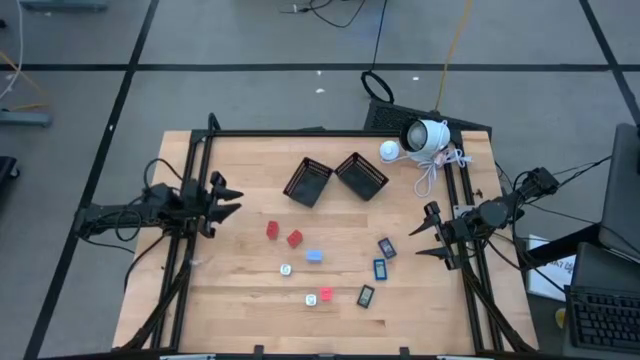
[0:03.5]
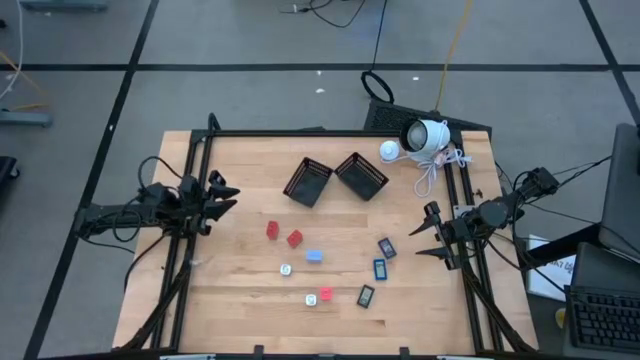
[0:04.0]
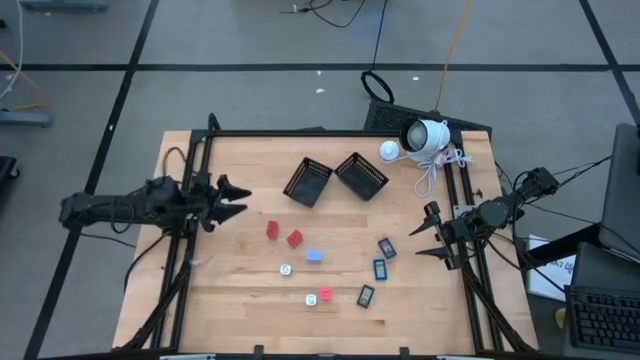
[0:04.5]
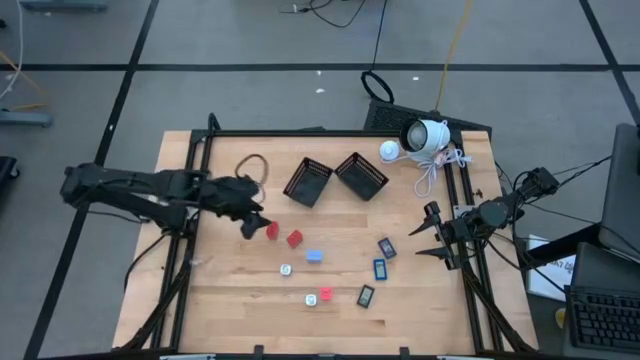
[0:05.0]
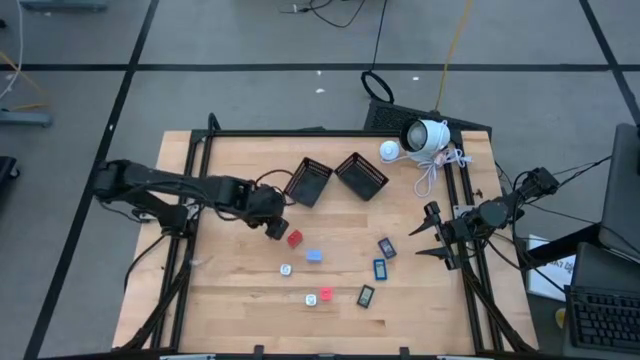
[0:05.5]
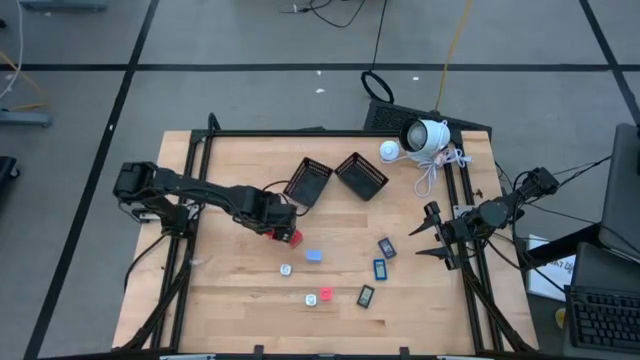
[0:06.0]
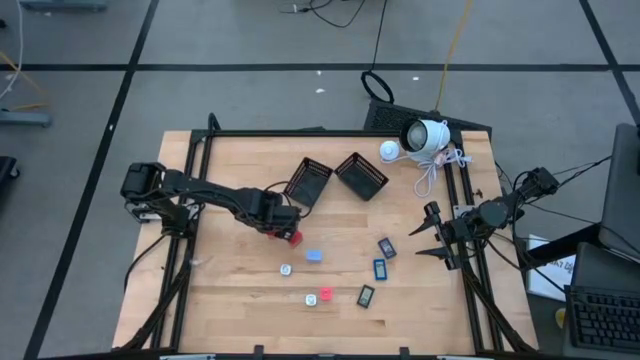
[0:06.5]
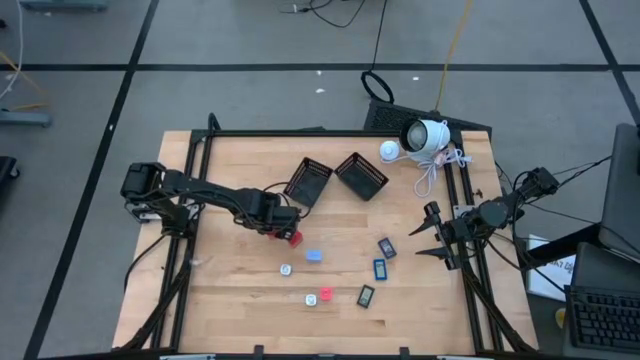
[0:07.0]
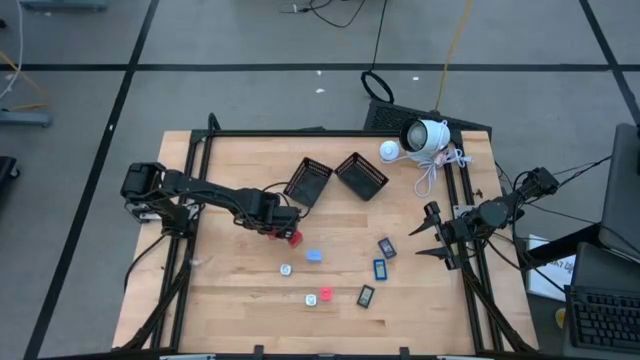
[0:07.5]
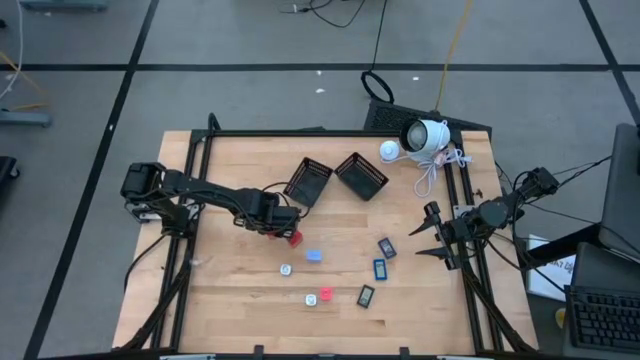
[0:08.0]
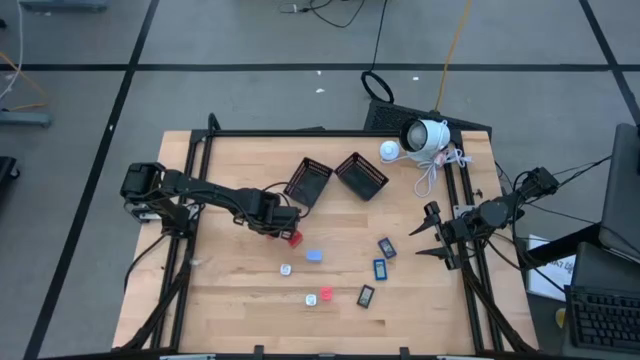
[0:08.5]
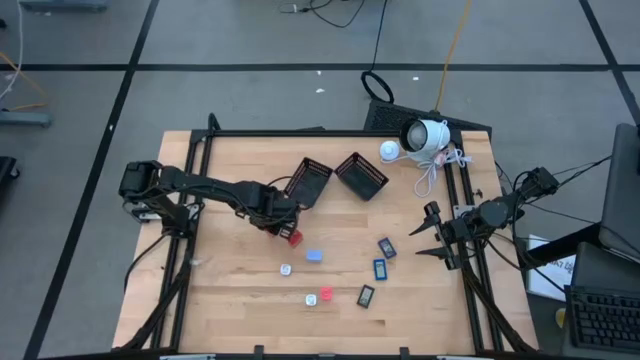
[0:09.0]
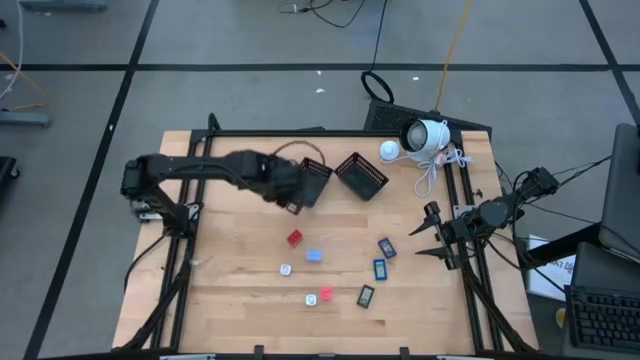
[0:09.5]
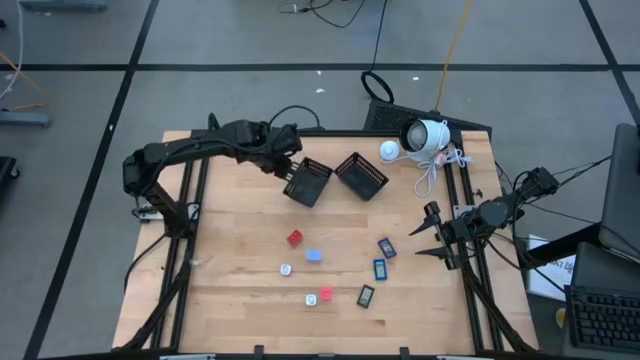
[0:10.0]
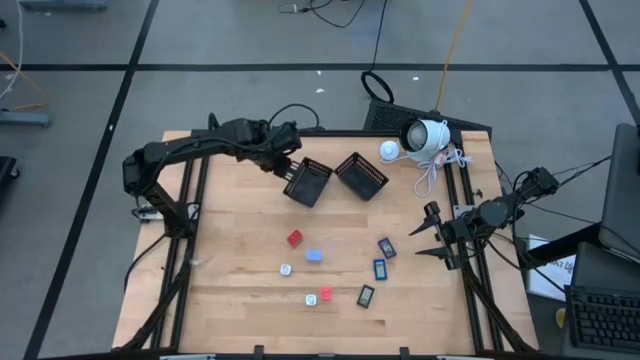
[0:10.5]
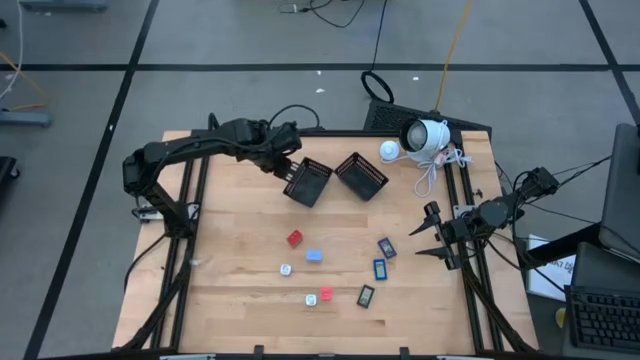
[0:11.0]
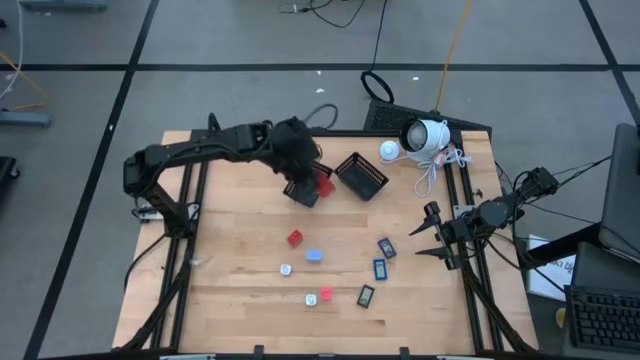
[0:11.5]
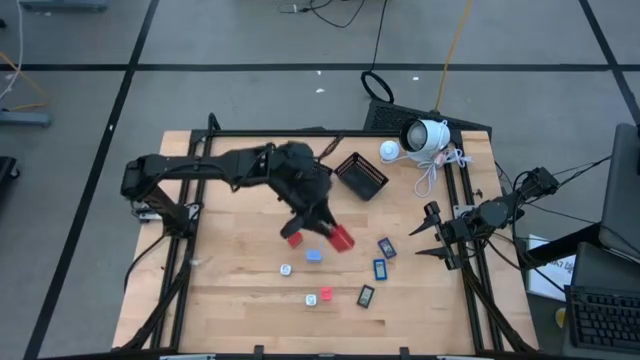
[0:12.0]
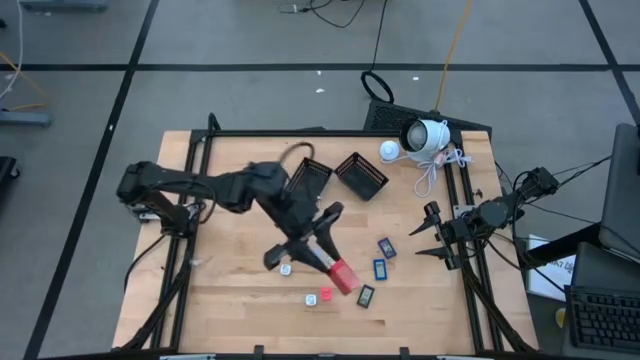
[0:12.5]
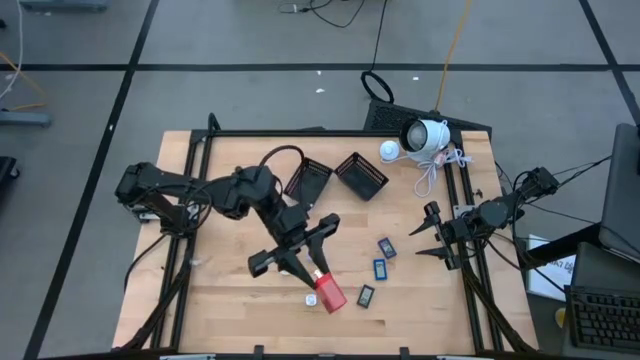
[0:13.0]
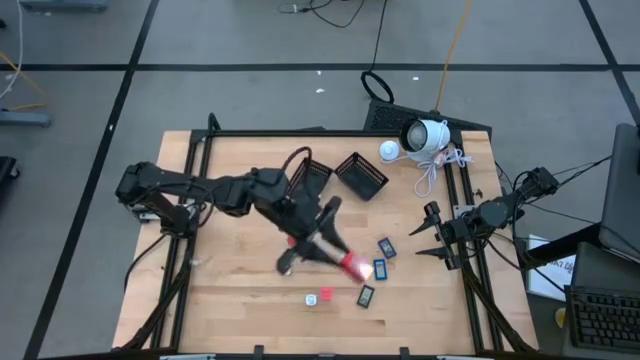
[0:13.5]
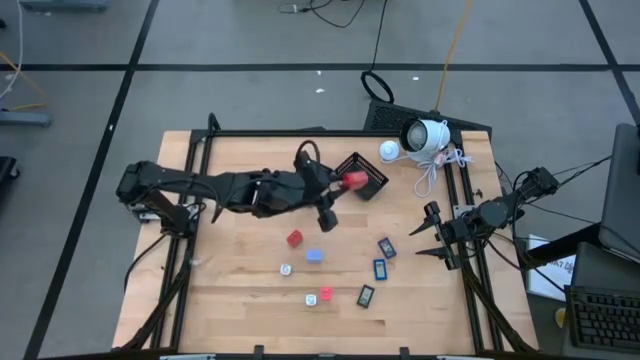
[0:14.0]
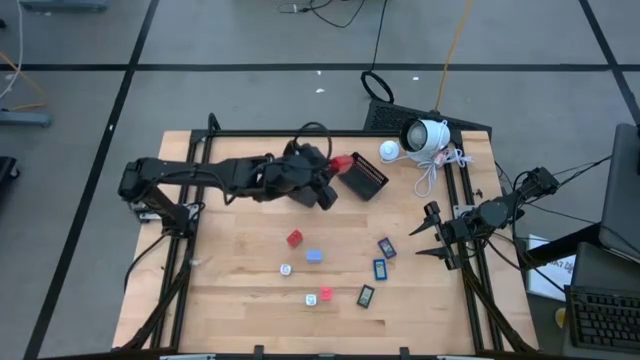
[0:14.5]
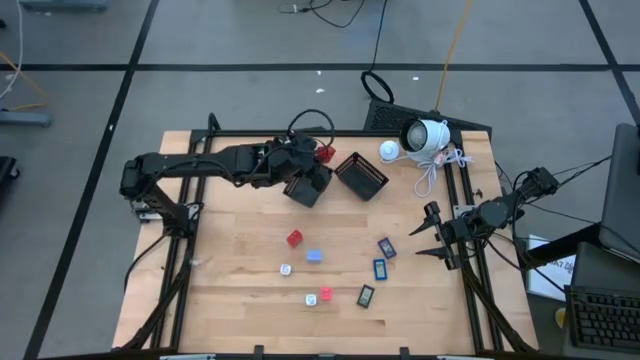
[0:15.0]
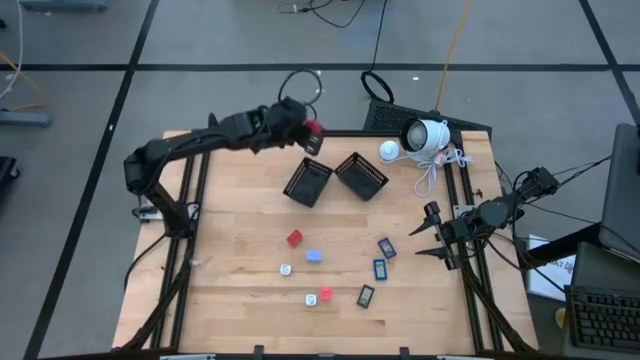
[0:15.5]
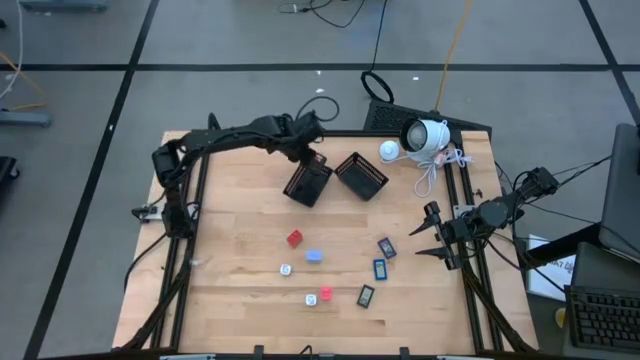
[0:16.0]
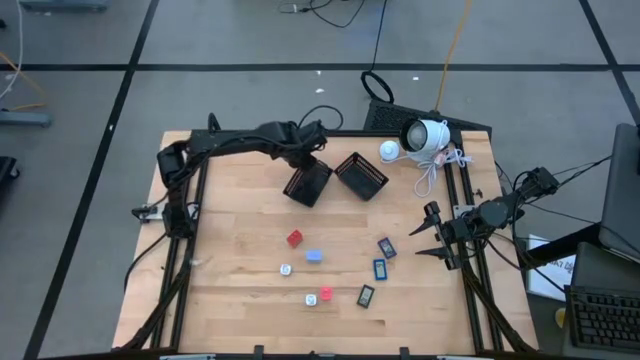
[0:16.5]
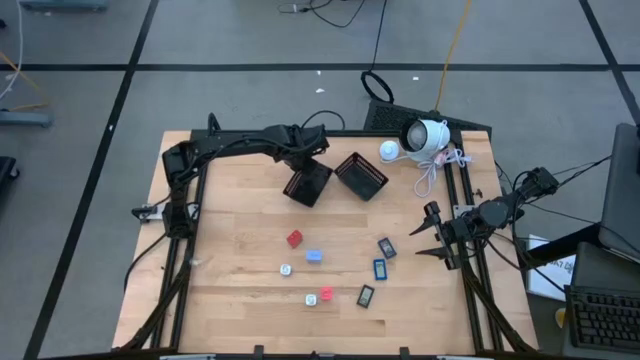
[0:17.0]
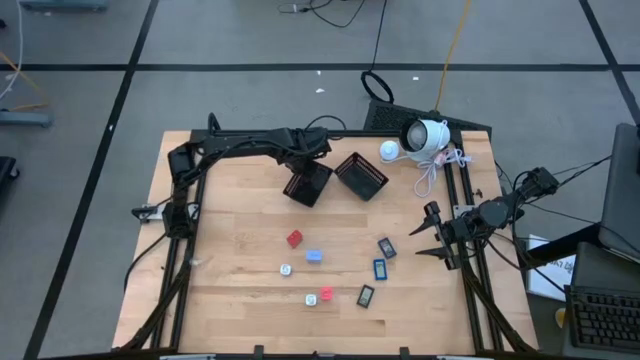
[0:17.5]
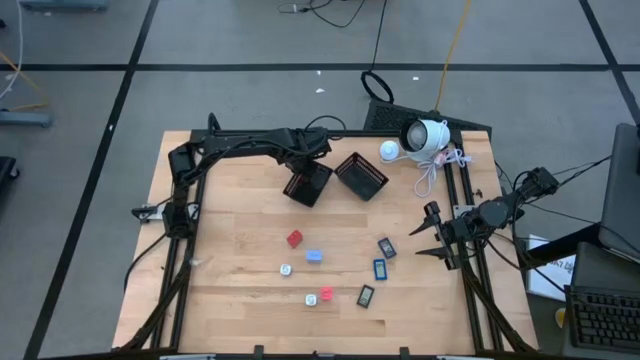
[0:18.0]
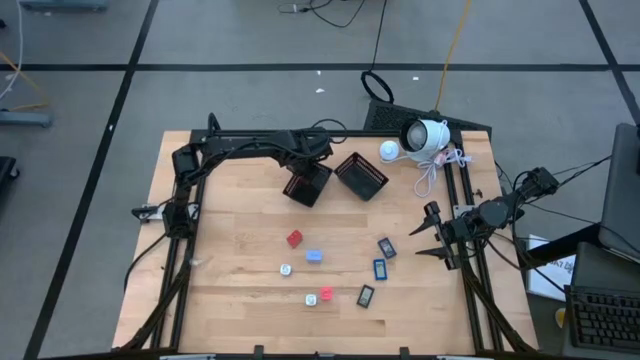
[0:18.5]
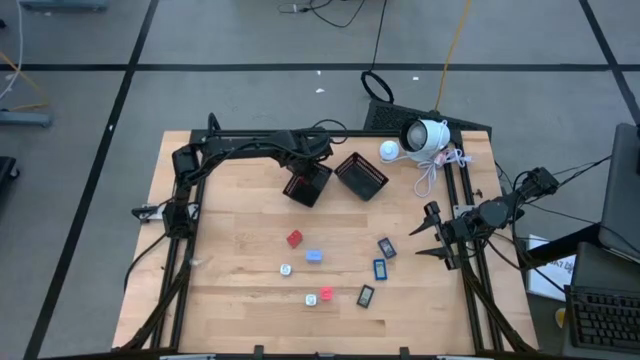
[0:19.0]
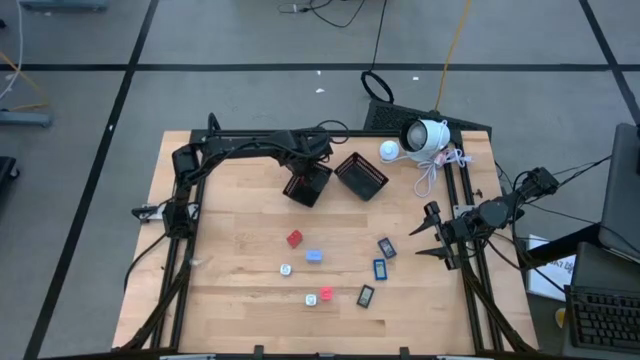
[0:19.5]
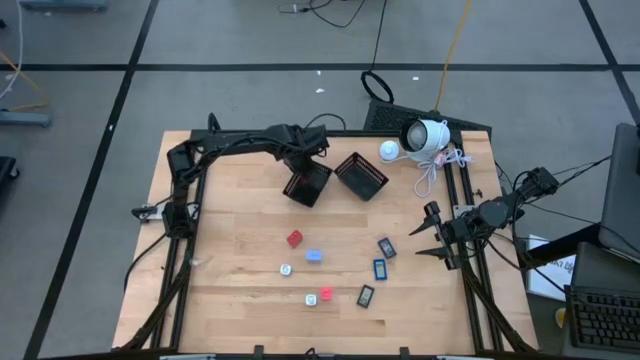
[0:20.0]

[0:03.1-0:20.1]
Task: Pick & Place Office items
Put the left red charger adapter into the left black bin

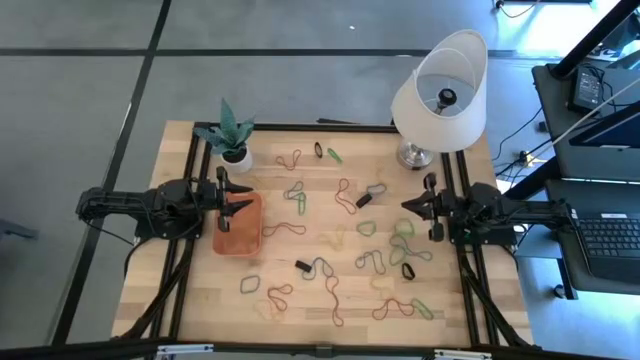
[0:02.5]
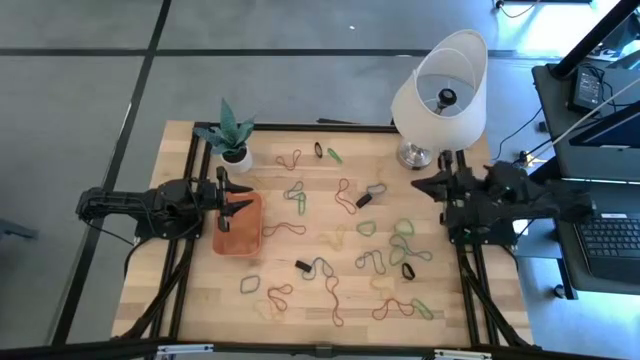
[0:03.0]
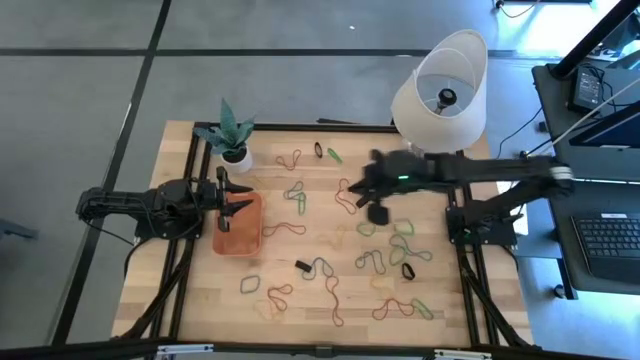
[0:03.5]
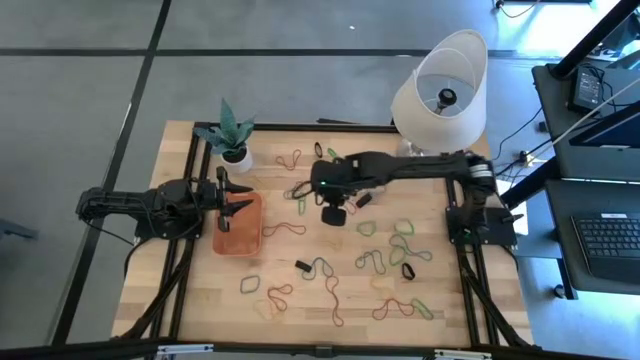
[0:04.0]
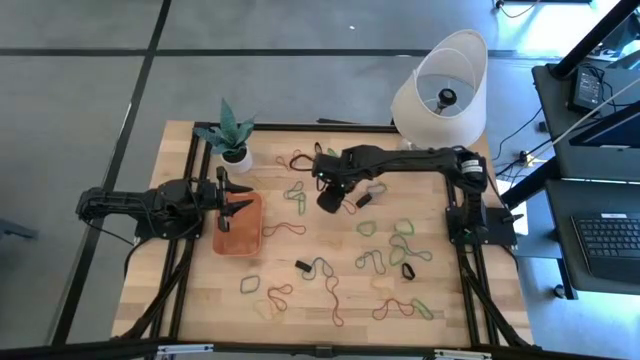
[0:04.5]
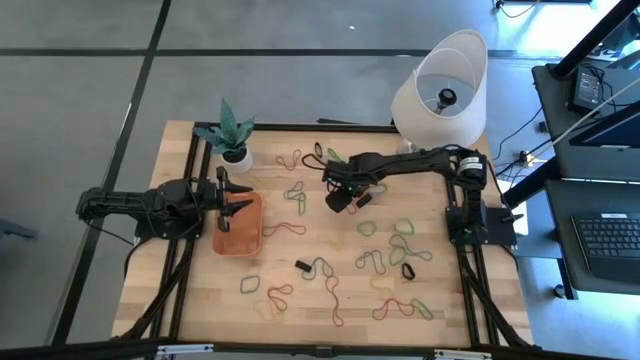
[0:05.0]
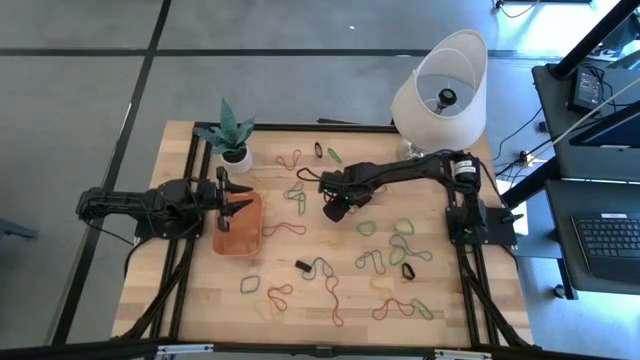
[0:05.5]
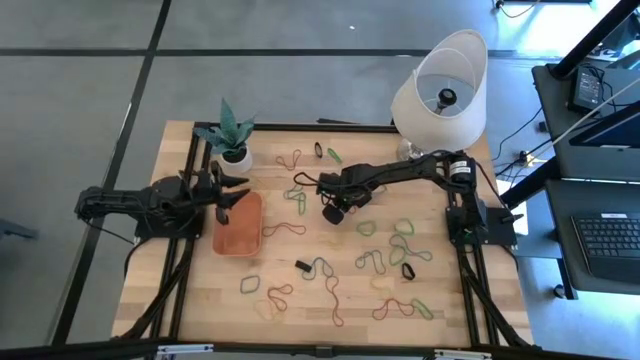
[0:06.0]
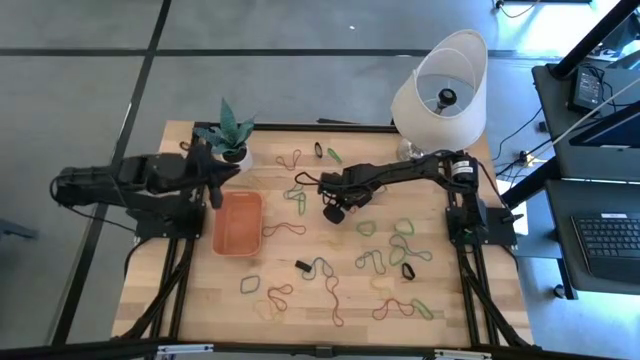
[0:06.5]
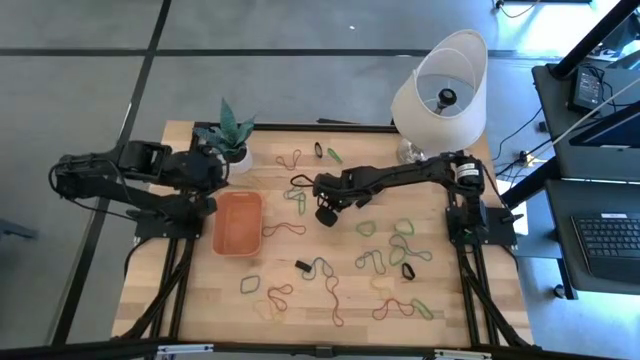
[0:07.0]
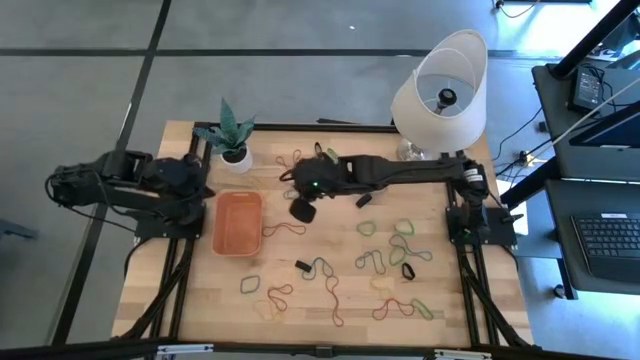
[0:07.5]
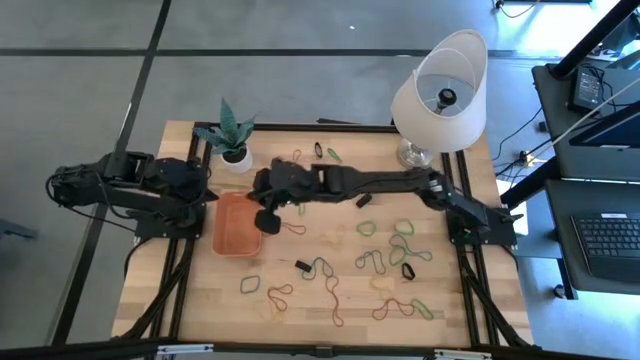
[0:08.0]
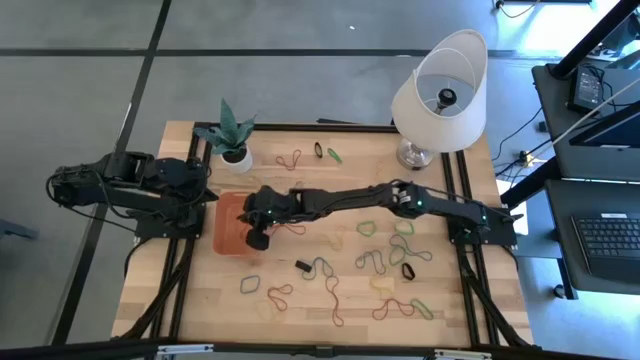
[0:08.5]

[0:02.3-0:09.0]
Task: Pick and place rubber bands into bin
Put the red rubber band into the orange bin
